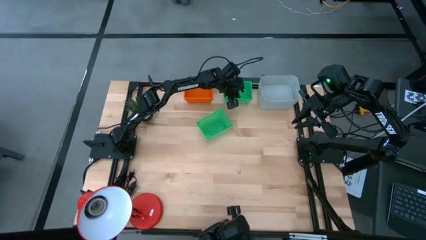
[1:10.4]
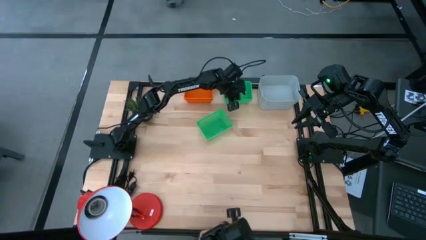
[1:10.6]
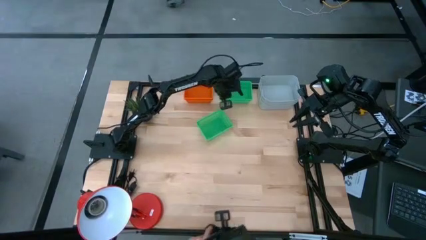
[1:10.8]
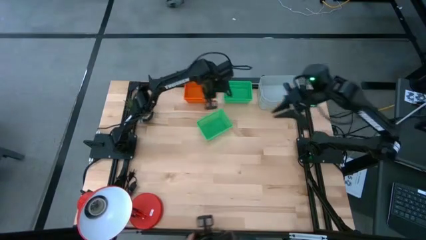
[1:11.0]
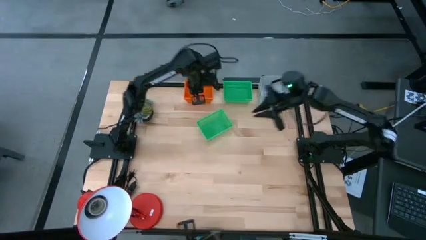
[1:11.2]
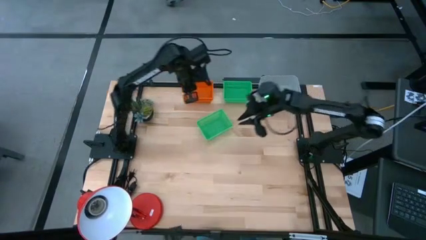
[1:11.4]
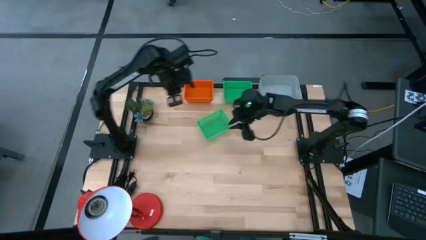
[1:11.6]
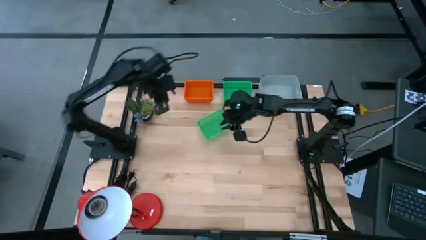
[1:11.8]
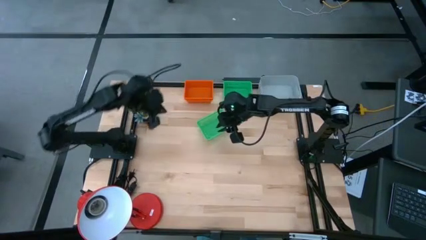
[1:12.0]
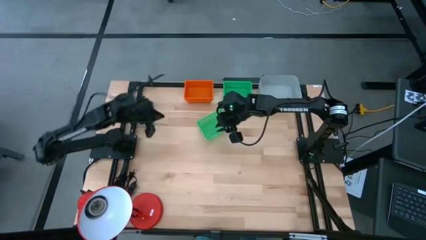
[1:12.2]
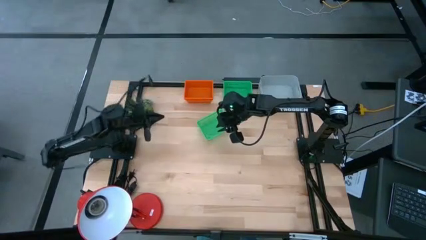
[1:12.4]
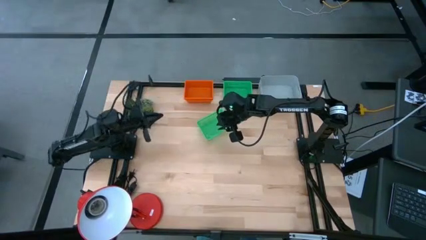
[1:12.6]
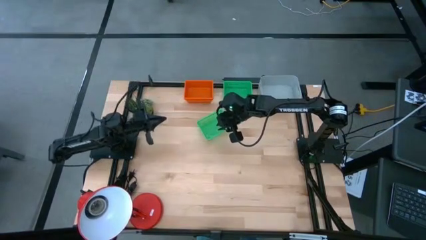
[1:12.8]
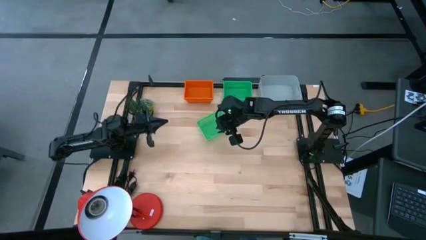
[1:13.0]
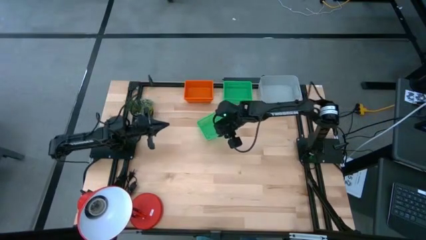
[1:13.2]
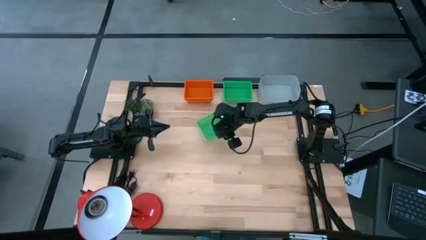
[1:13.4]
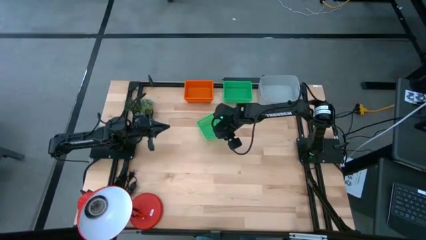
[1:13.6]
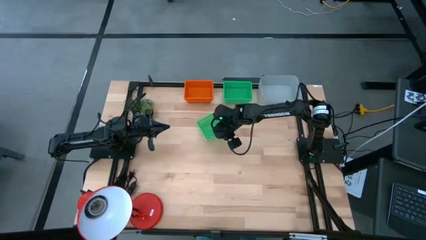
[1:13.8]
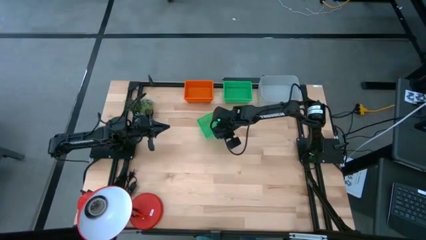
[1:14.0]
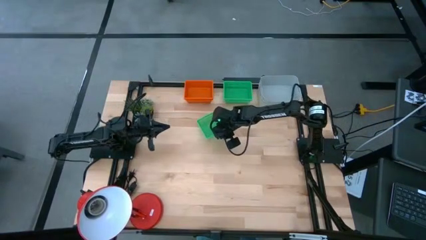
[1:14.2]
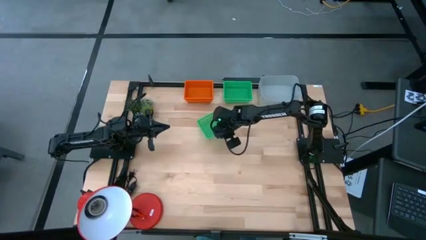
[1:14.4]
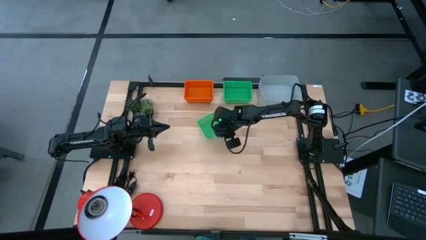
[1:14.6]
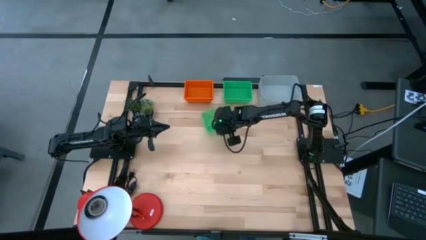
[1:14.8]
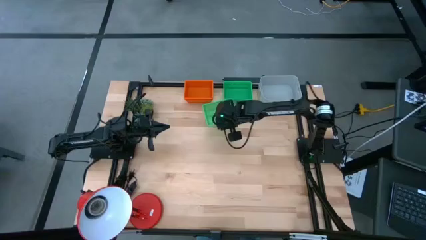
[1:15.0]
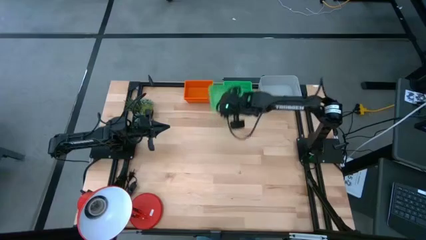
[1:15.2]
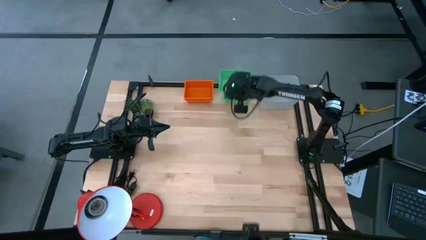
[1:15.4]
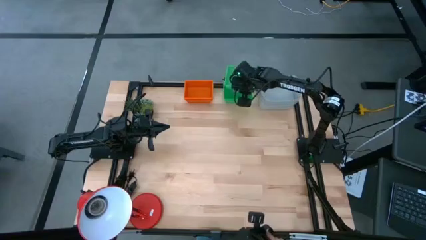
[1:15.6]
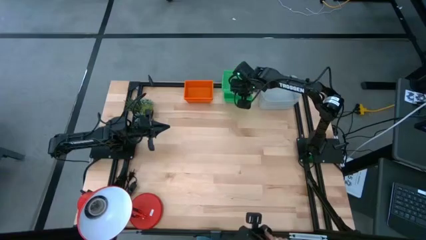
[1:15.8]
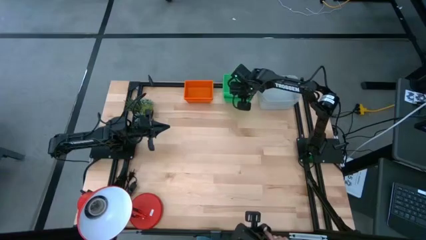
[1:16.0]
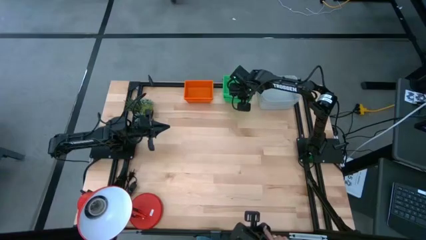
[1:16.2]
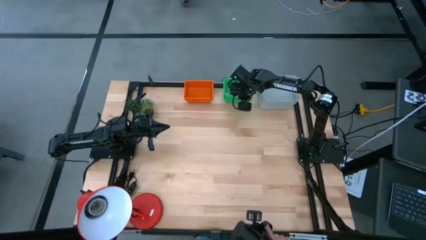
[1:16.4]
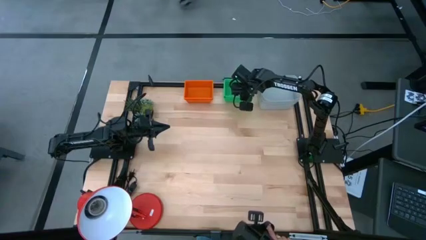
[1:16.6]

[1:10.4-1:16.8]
Stack the green bin on the stacked green bin

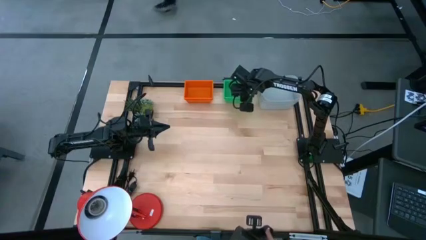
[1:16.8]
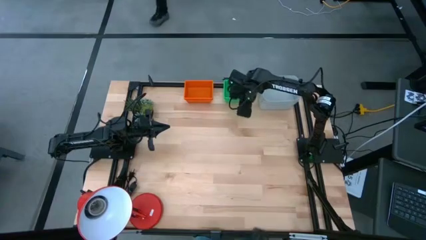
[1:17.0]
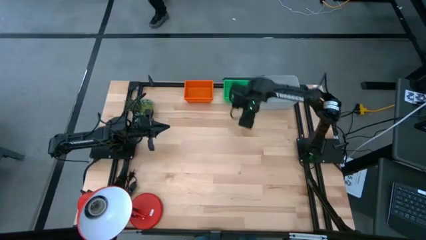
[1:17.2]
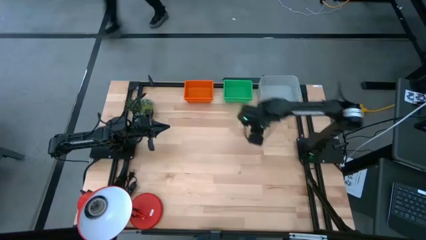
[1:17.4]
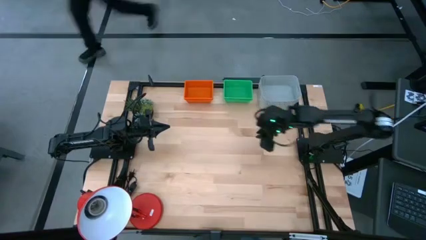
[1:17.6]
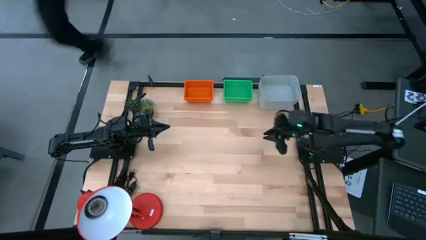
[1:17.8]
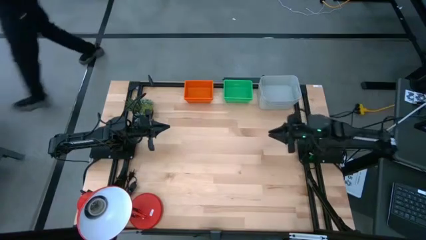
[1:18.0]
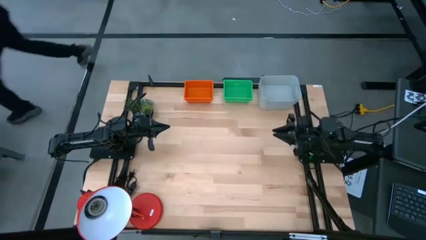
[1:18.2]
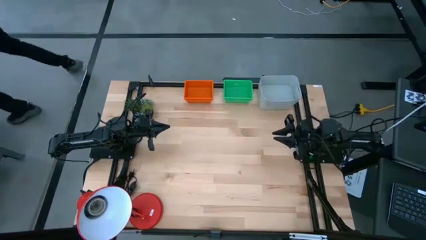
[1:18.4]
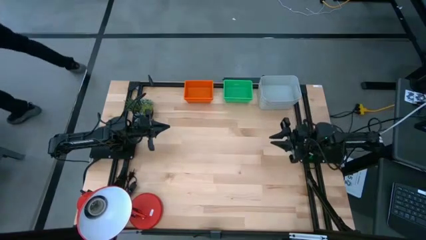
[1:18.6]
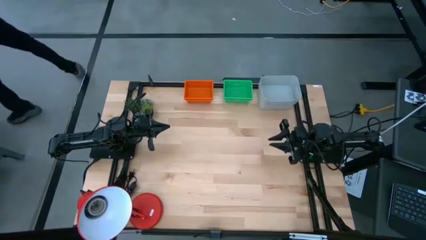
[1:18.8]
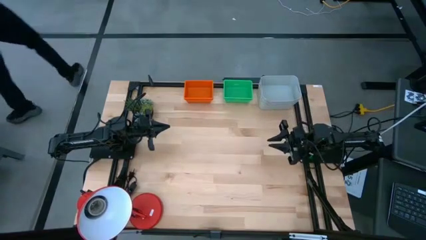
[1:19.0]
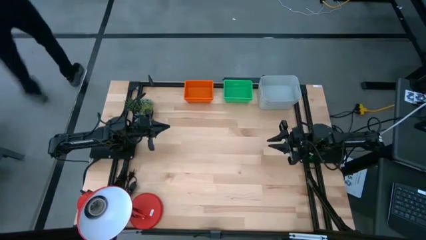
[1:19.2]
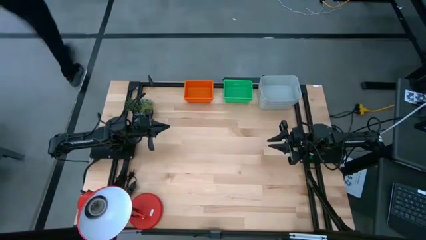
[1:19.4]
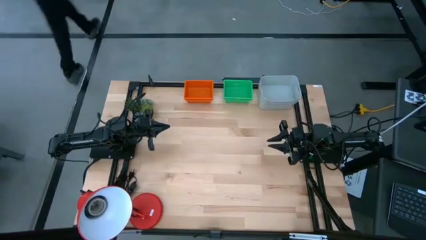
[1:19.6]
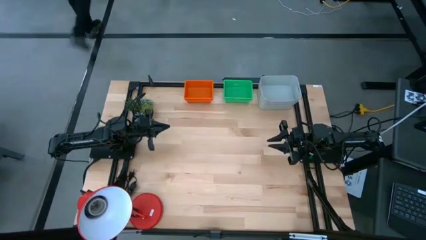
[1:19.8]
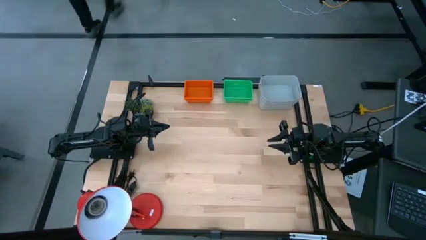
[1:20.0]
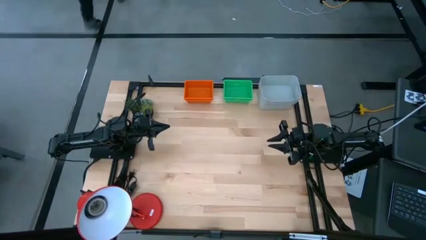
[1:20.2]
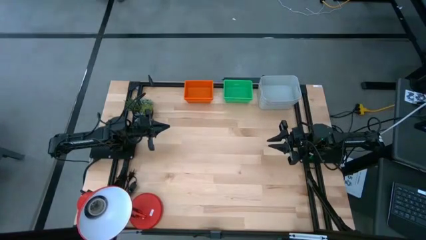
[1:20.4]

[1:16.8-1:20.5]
Return to Home Position

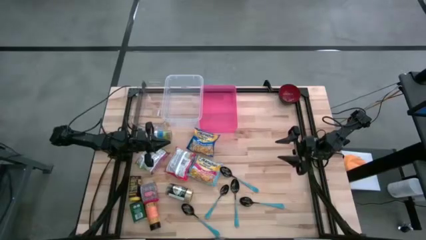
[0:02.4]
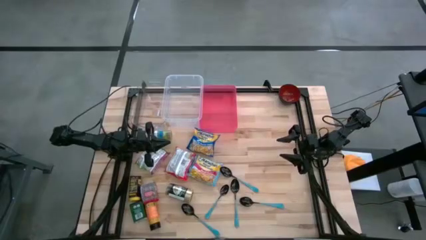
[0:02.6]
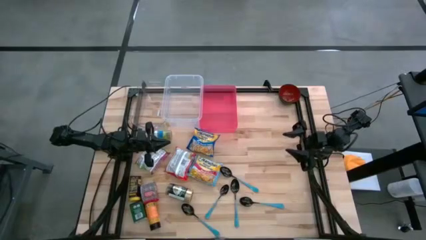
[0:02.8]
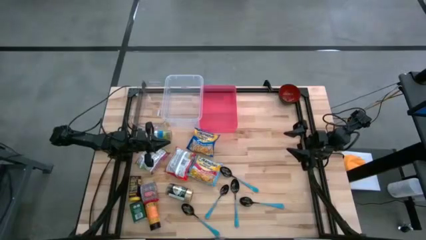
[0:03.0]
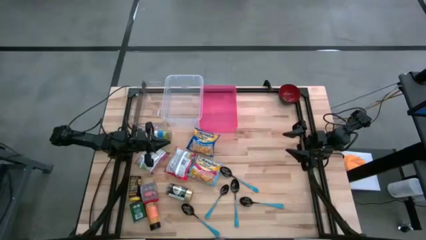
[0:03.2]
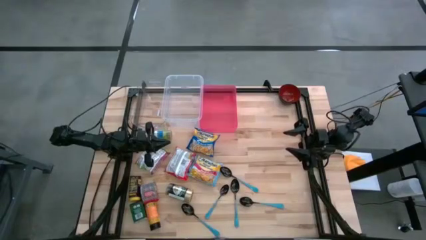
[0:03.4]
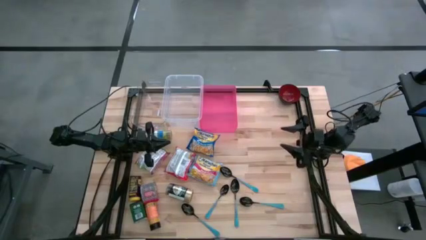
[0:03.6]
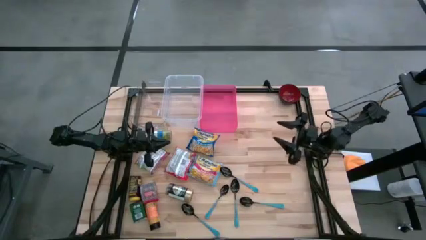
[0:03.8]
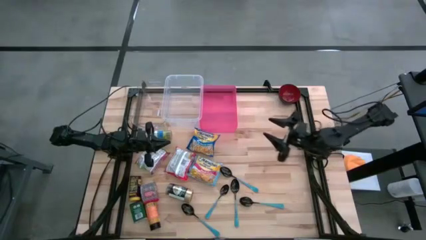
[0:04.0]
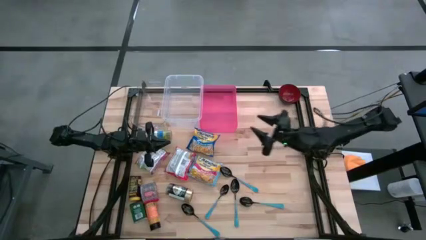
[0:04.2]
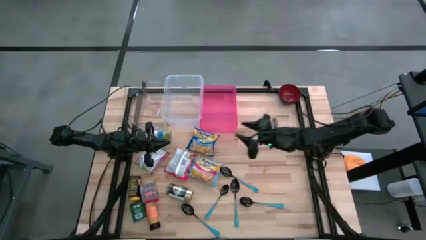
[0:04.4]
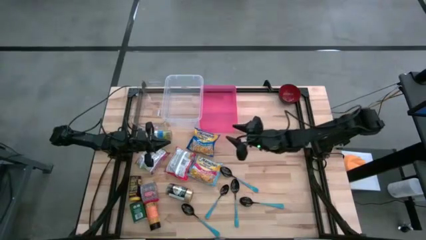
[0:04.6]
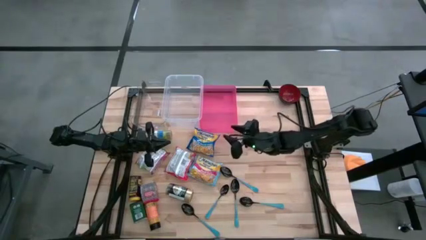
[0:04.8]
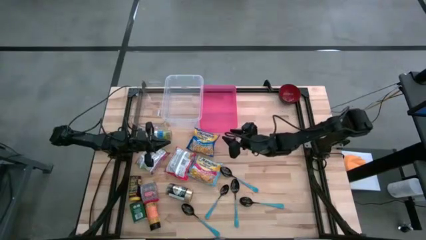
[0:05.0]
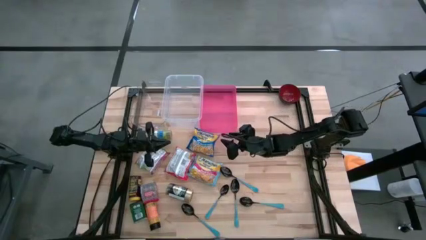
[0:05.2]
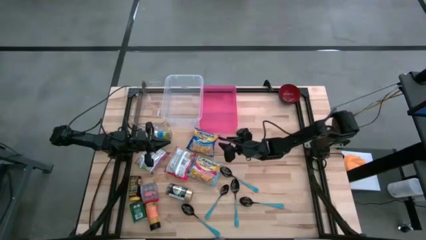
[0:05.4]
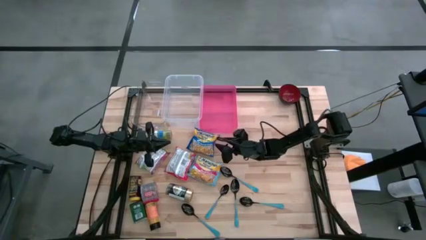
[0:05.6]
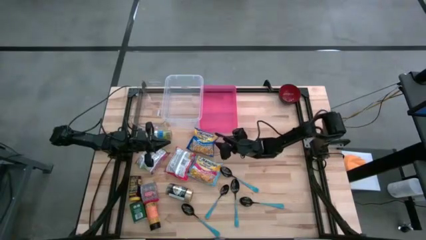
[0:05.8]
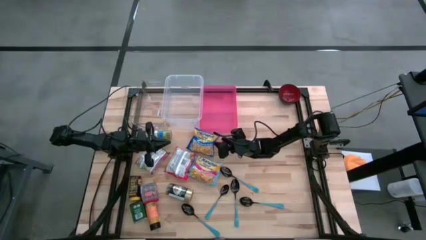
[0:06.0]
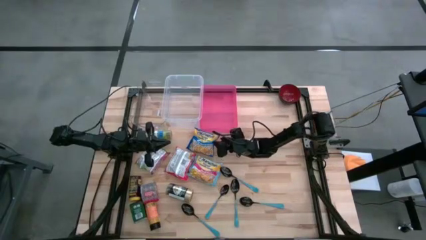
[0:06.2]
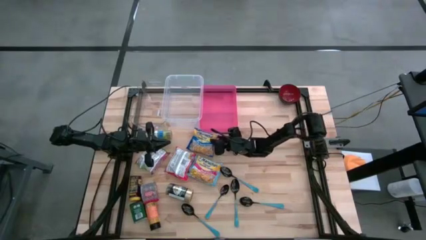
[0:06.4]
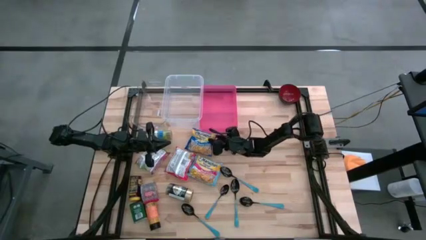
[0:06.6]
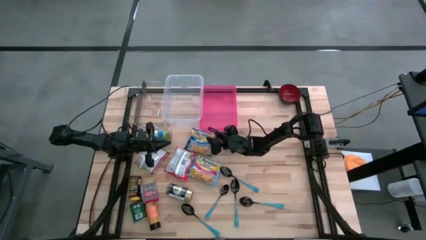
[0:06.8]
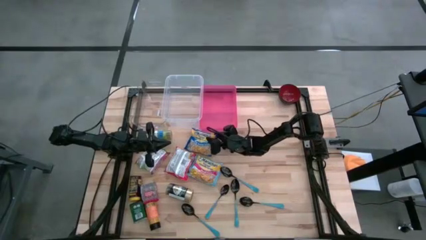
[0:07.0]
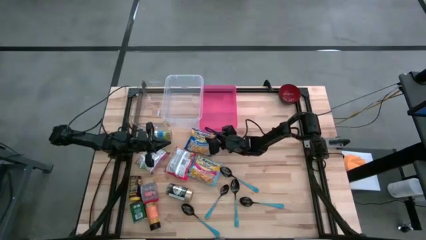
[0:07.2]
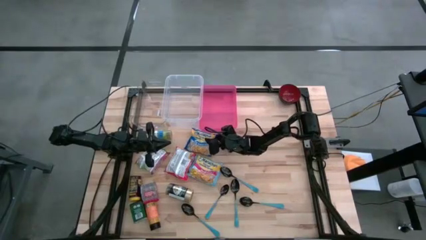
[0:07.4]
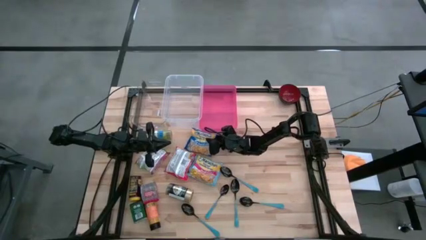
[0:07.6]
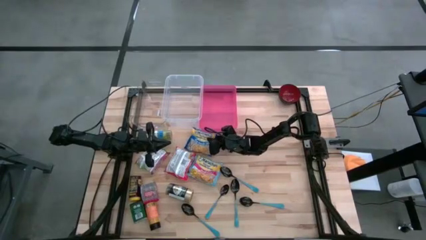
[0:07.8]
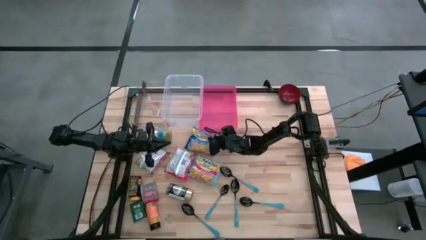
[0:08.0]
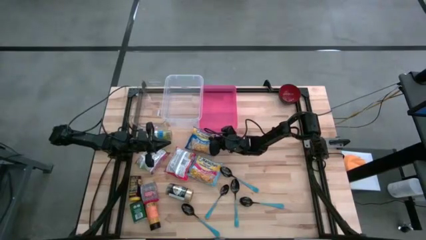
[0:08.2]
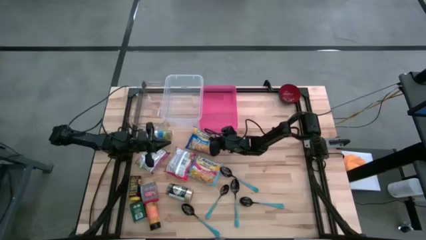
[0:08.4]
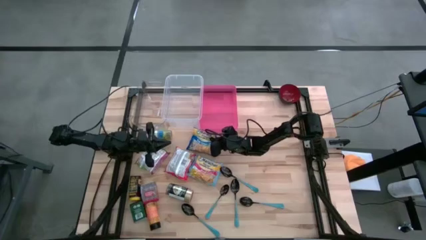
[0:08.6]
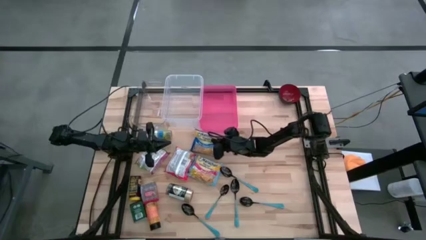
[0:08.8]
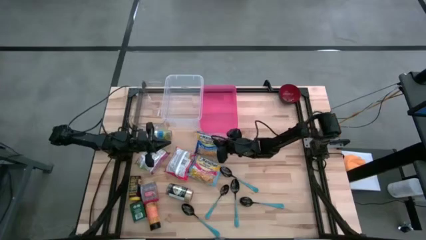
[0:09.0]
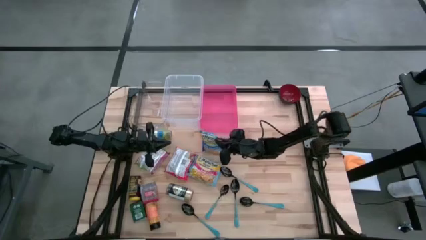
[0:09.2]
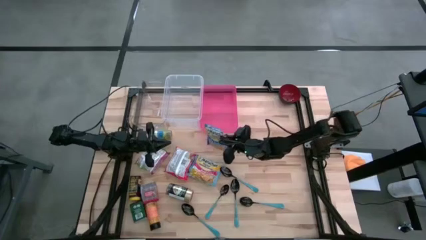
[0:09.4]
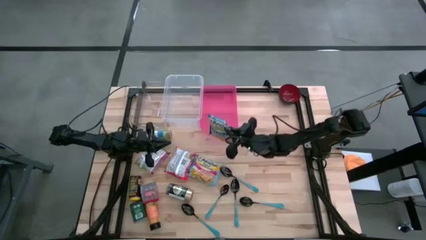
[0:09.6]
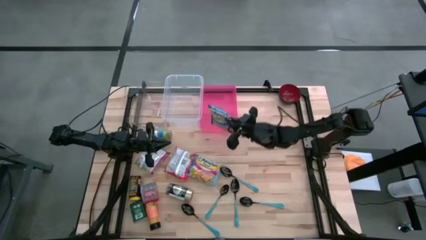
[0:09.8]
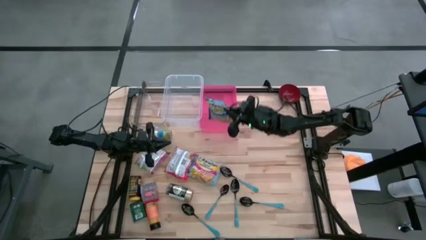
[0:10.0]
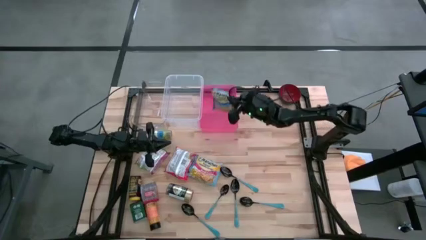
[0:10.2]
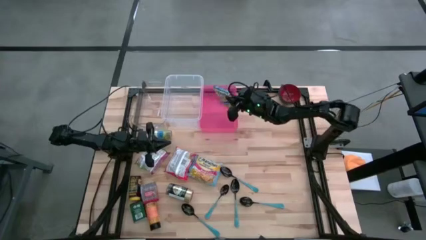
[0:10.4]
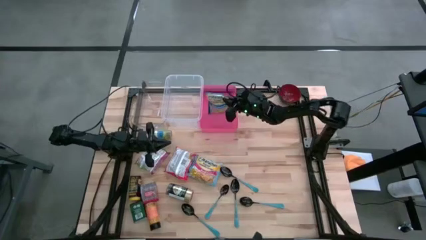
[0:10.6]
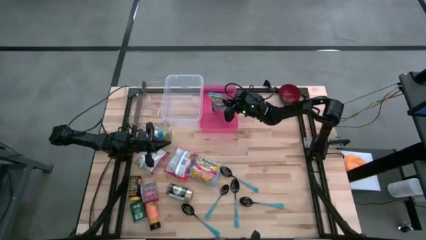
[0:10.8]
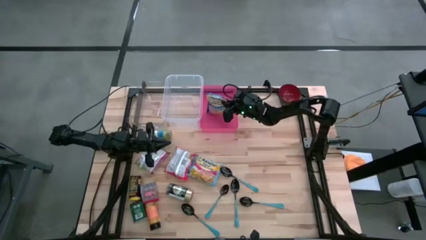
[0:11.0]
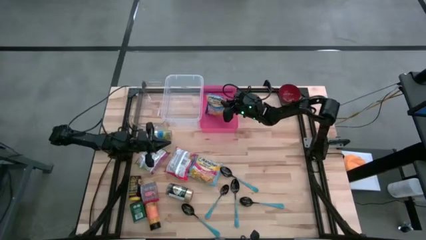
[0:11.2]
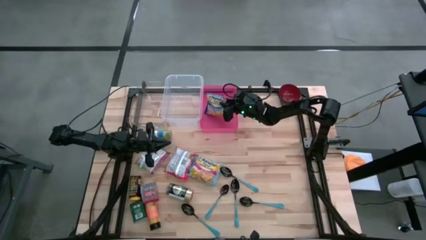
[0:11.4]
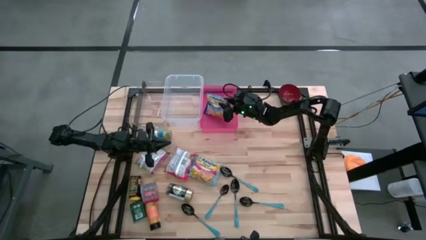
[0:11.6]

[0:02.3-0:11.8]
Put the blue noodle pack into the pink bin
